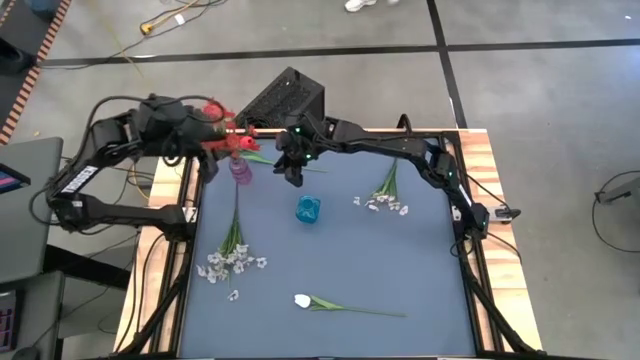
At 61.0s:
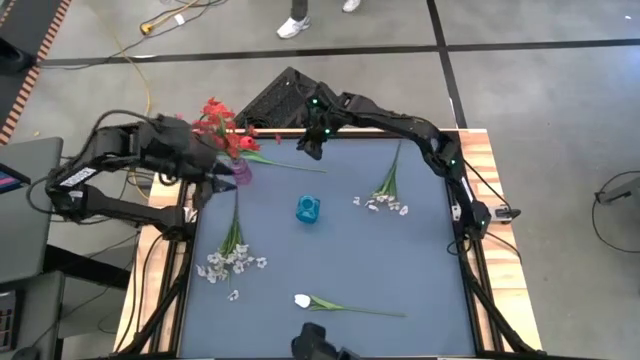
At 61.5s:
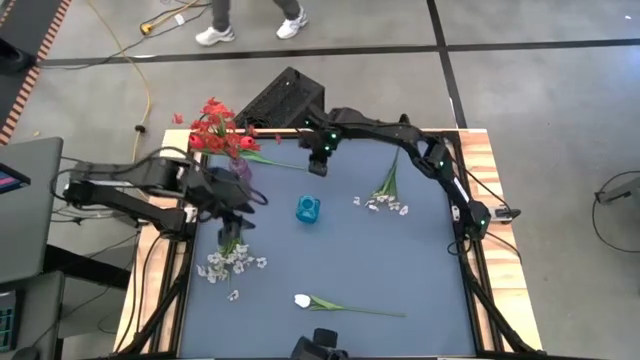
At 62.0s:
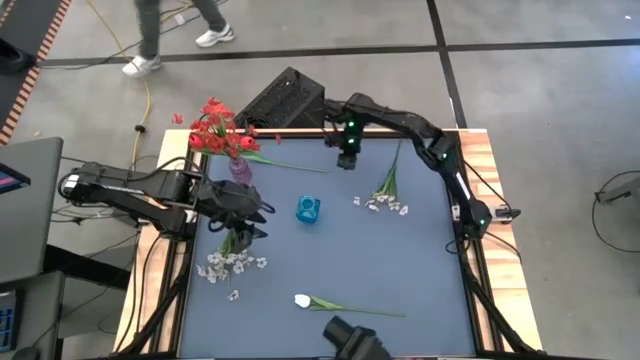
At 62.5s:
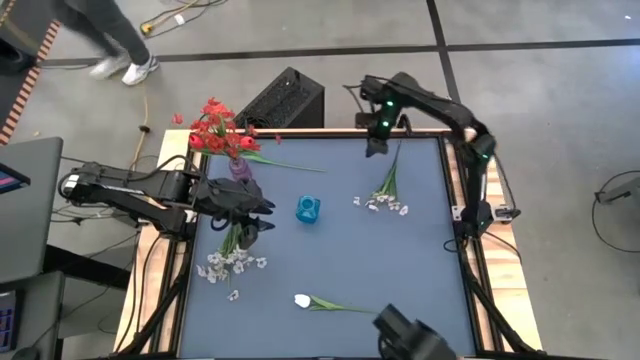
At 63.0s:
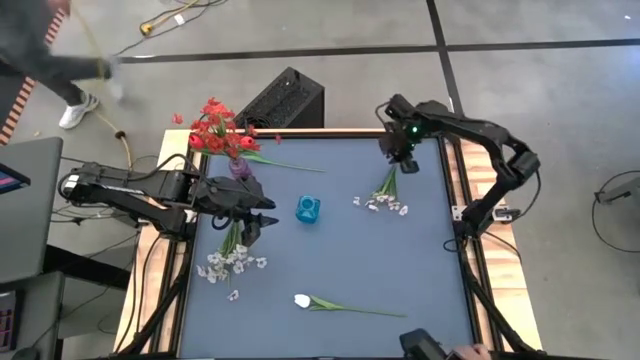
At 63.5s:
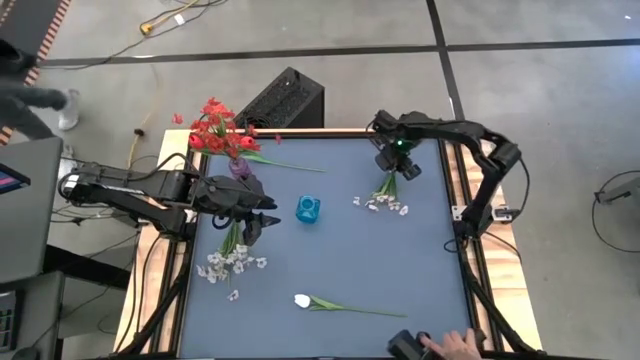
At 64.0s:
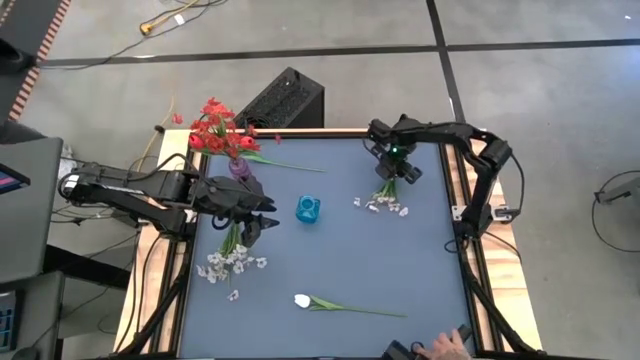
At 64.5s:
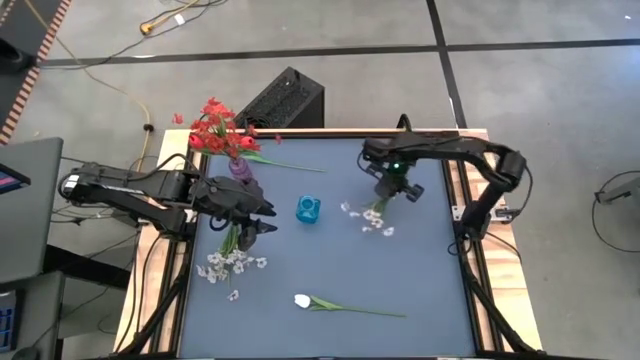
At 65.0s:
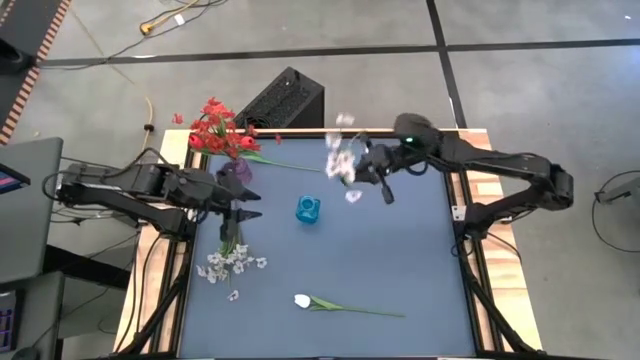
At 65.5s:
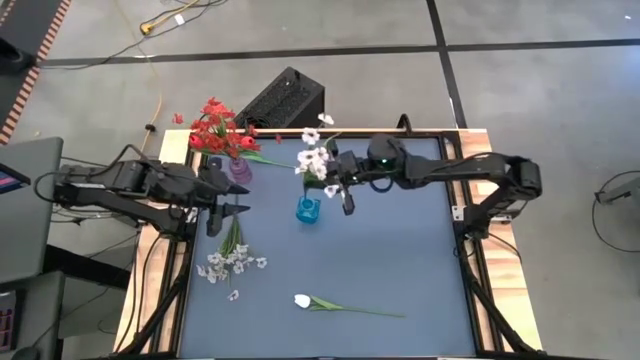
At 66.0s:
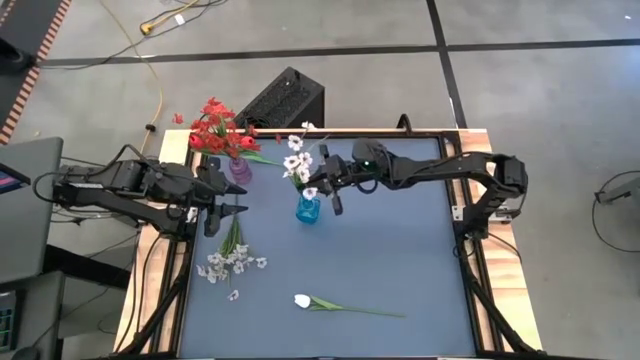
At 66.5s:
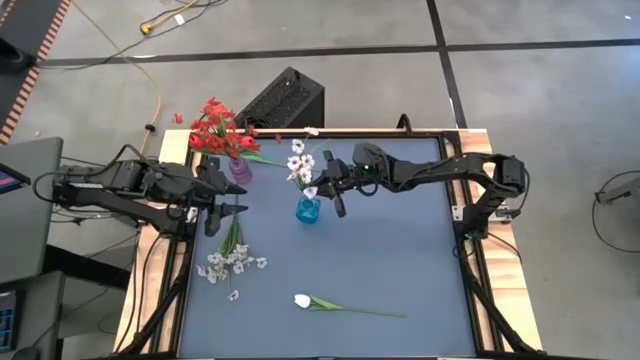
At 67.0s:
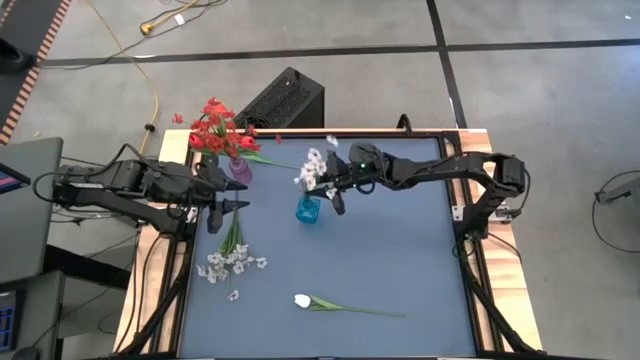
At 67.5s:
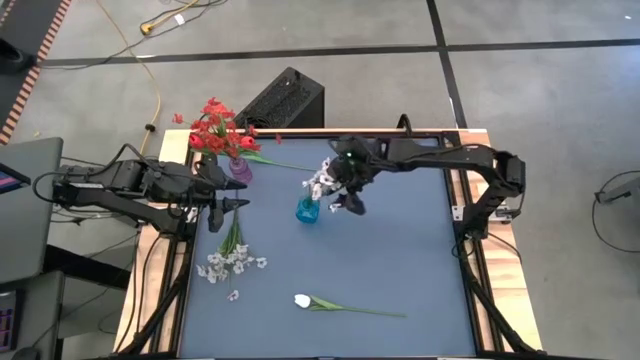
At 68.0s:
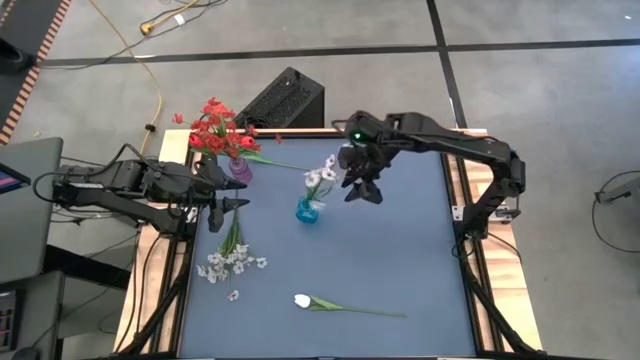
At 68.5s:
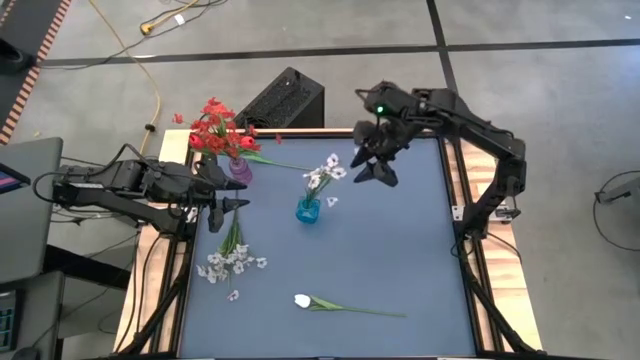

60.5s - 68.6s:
Task: Sort flowers into vase by color
Put the right white flowers into the blue vase

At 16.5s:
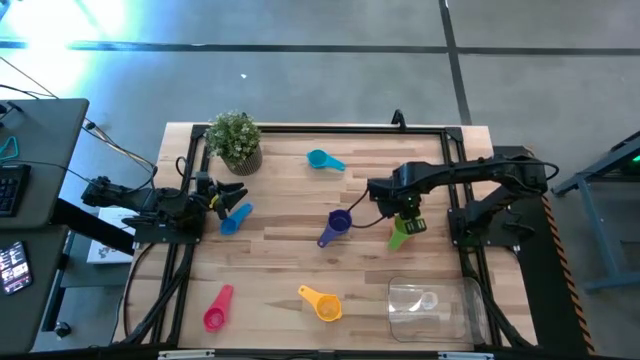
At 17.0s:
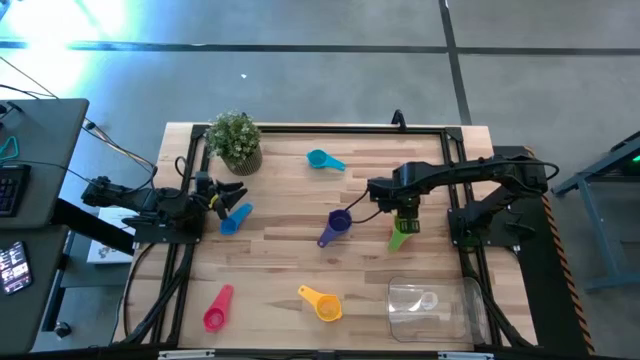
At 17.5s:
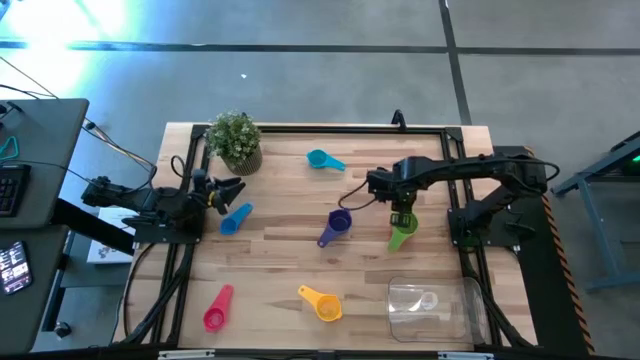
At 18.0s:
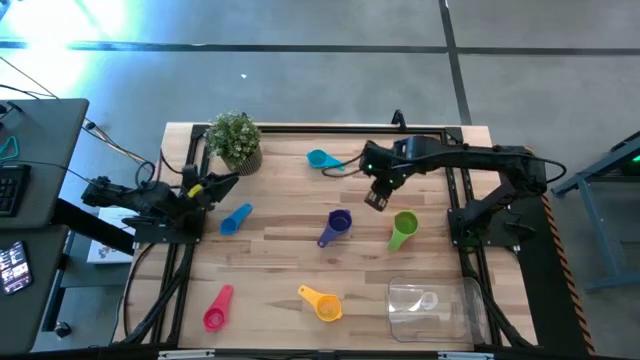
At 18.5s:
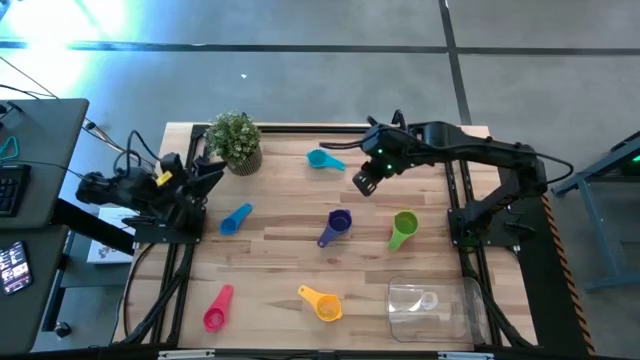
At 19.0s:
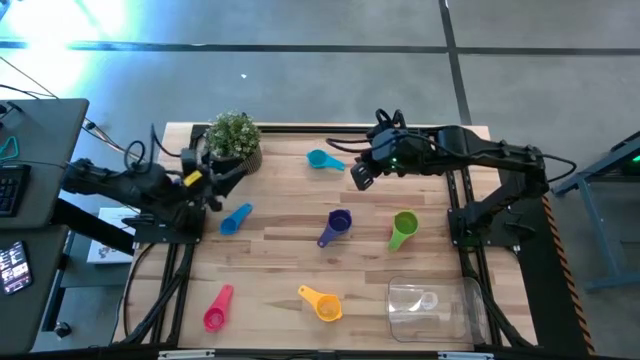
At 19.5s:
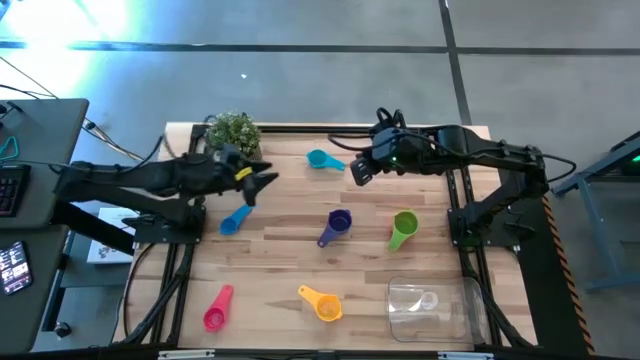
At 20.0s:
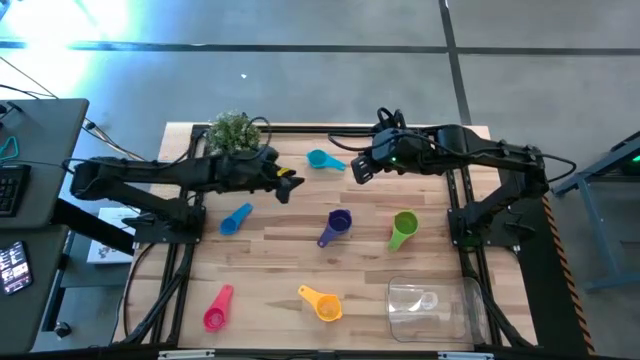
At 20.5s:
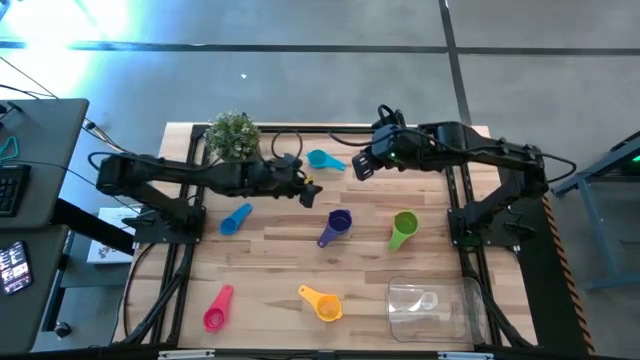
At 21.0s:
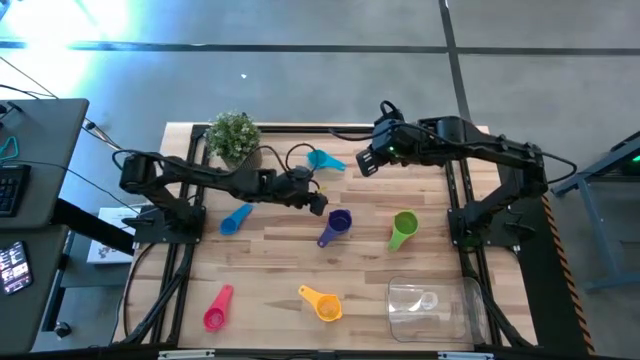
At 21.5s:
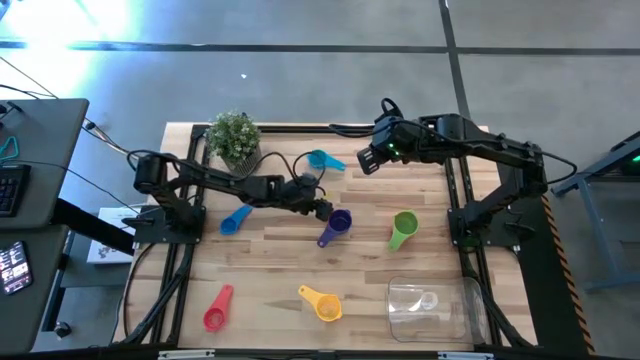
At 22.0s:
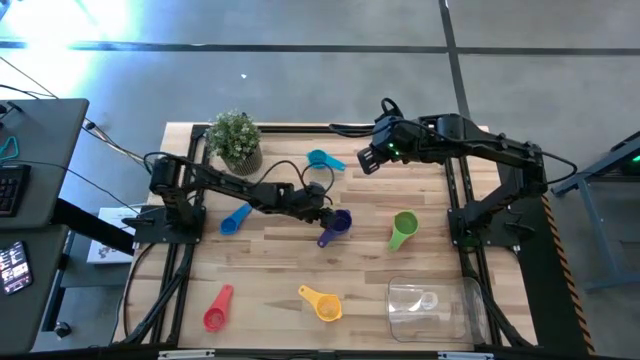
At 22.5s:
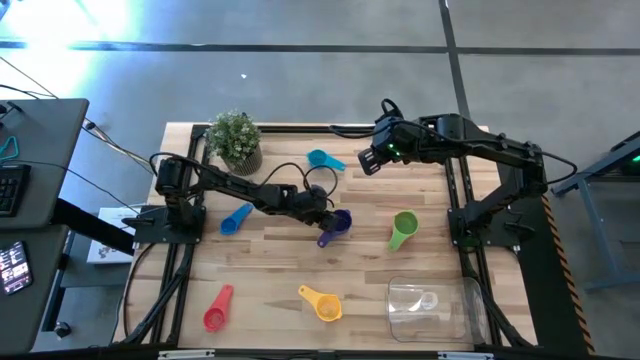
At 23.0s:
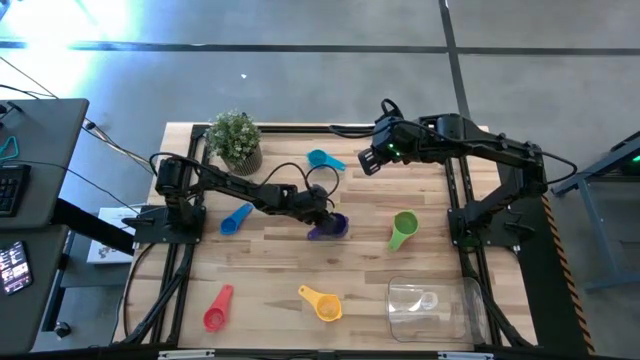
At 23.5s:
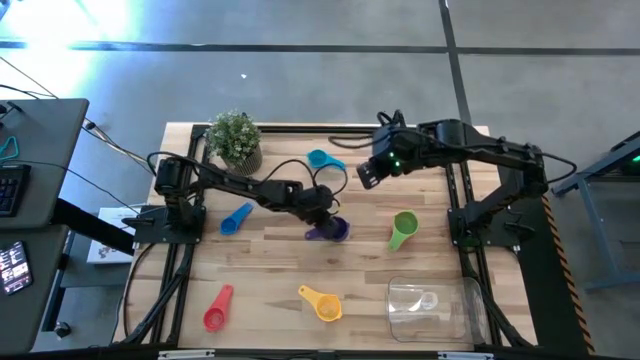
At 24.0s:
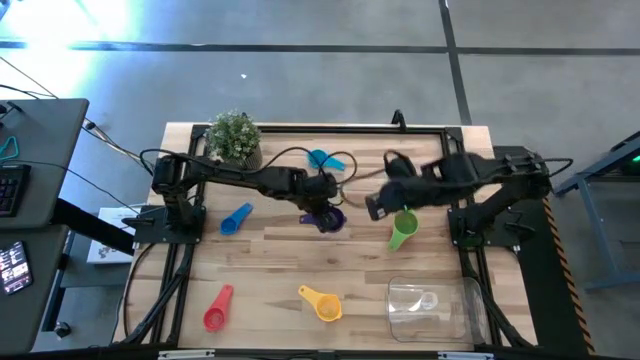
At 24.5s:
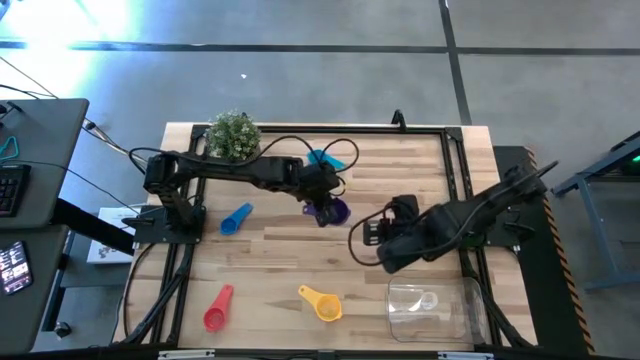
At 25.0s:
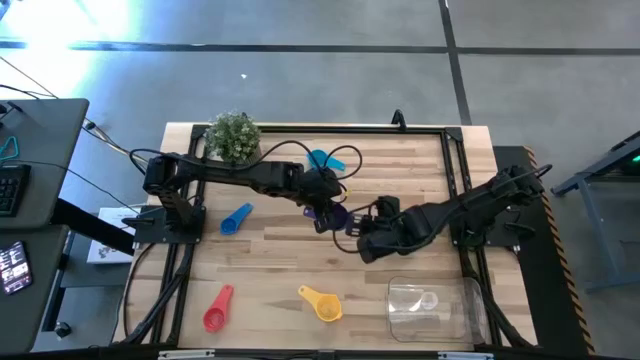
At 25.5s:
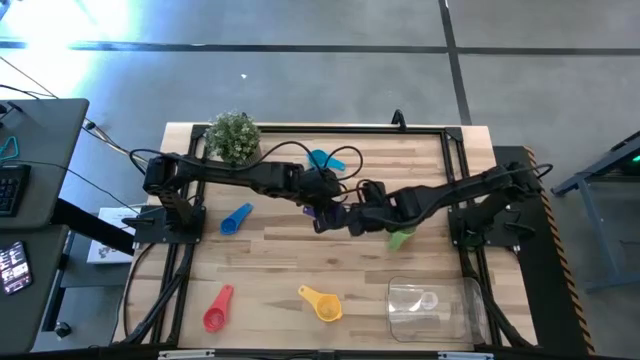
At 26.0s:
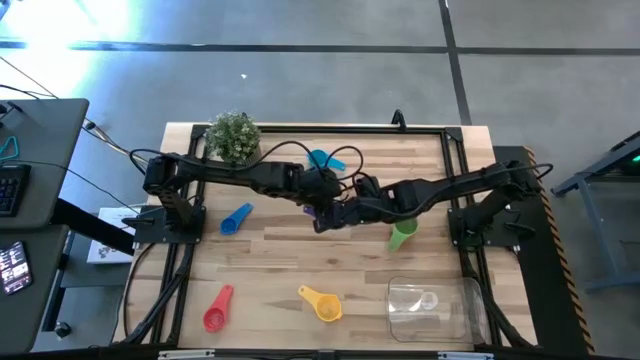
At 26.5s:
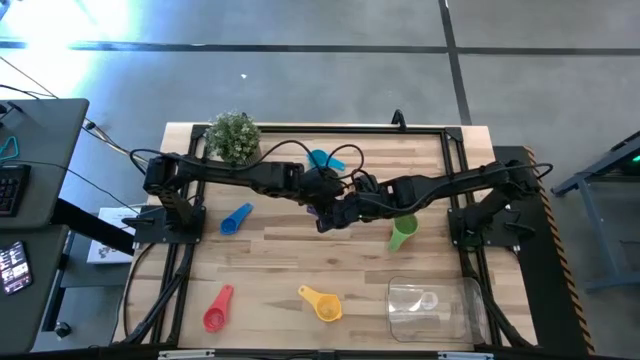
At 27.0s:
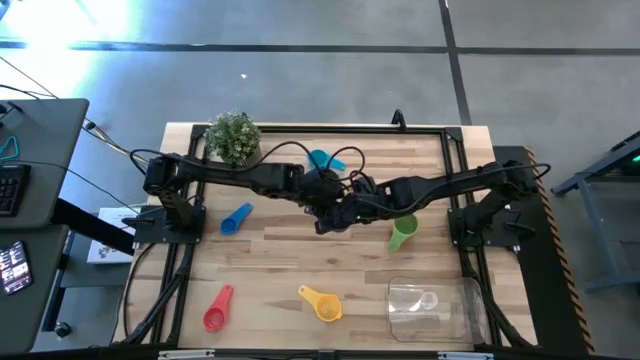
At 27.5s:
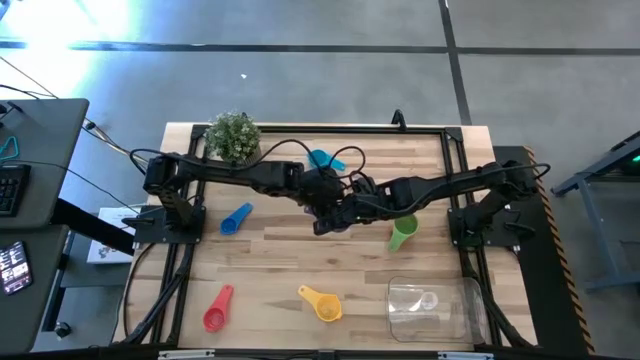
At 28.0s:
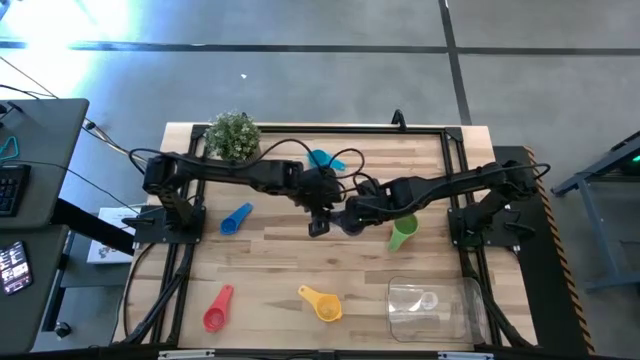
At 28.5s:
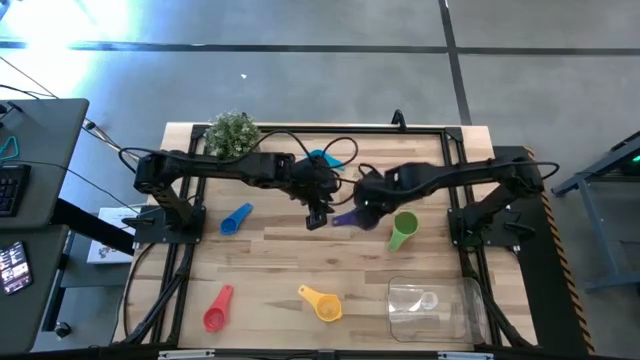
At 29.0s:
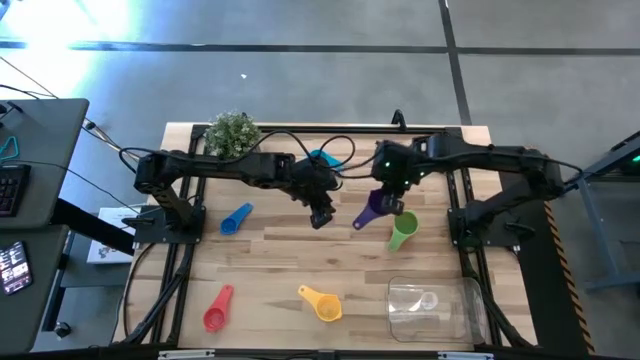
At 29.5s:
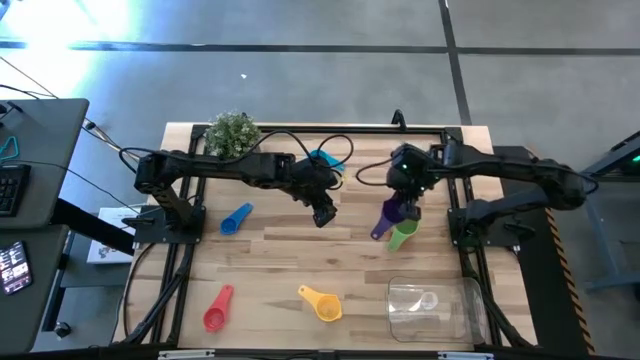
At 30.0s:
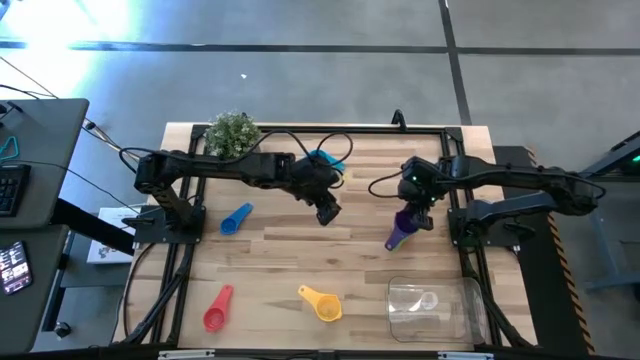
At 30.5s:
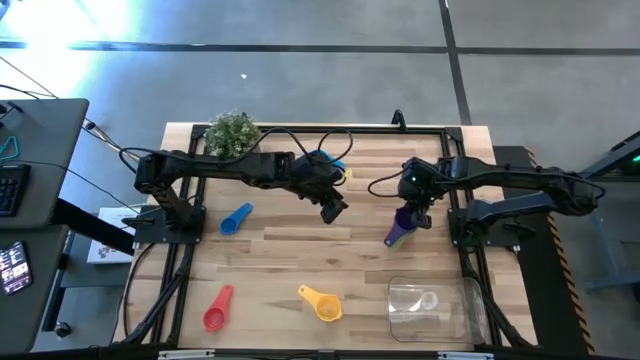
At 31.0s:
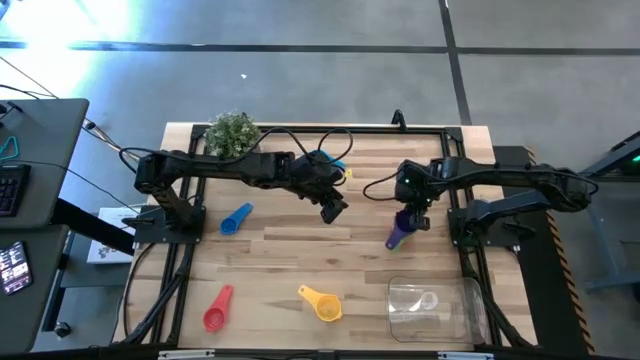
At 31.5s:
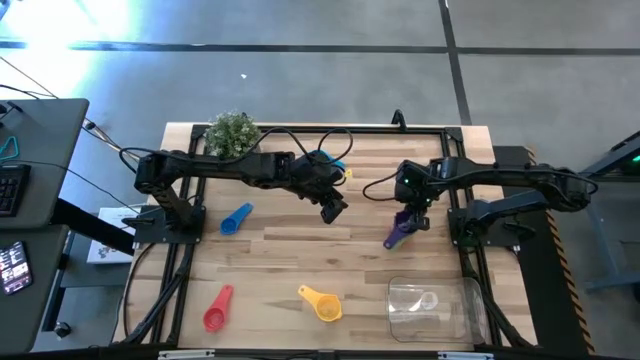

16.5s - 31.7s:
Task: Nest measuring cups in basket
Stack the dark blue measuring cup on top of the green measuring cup
